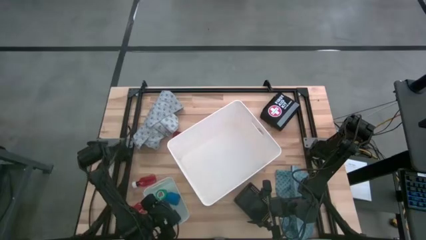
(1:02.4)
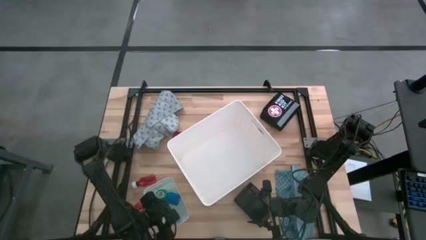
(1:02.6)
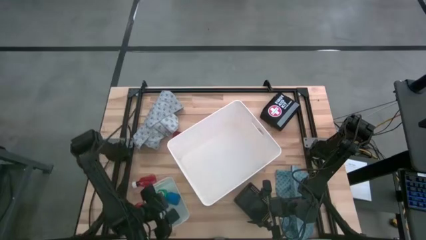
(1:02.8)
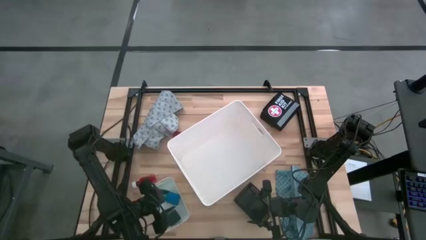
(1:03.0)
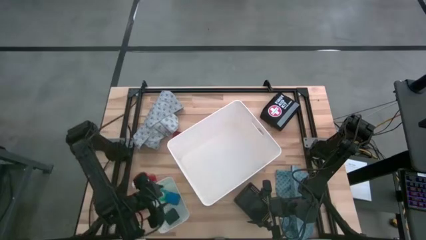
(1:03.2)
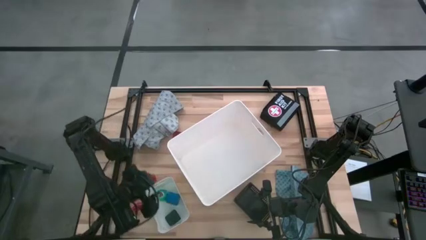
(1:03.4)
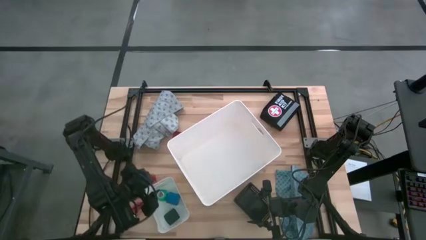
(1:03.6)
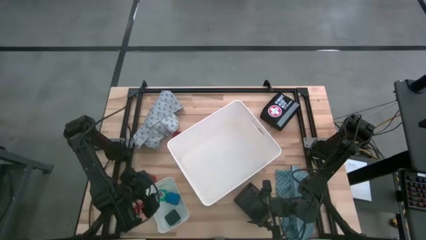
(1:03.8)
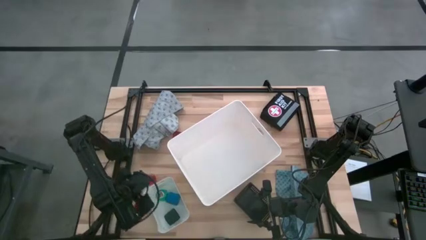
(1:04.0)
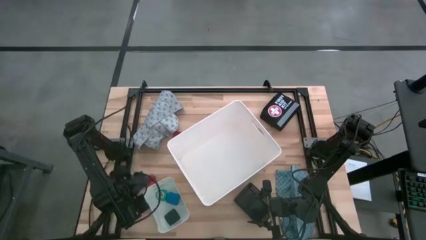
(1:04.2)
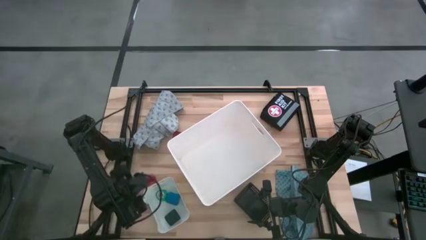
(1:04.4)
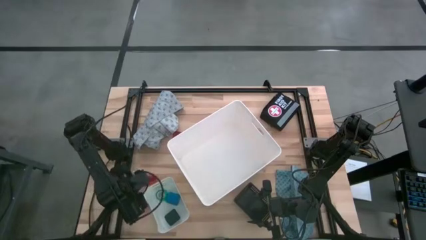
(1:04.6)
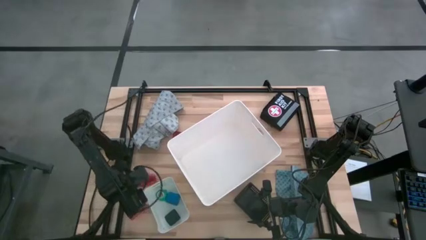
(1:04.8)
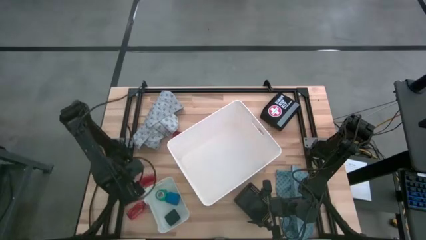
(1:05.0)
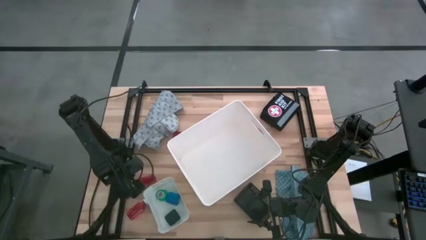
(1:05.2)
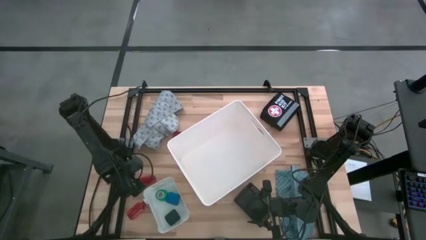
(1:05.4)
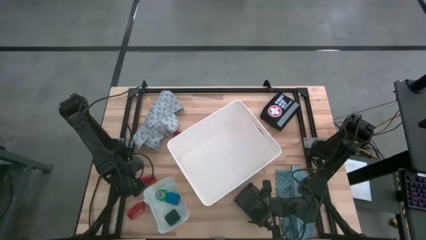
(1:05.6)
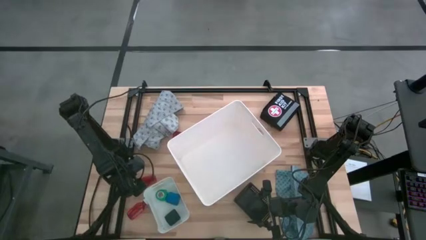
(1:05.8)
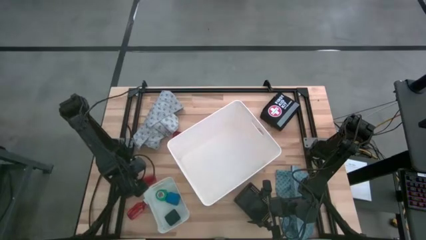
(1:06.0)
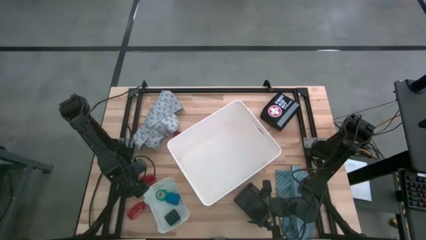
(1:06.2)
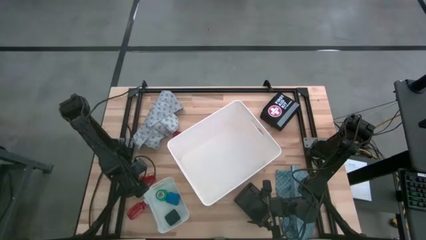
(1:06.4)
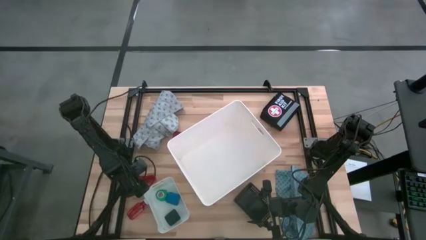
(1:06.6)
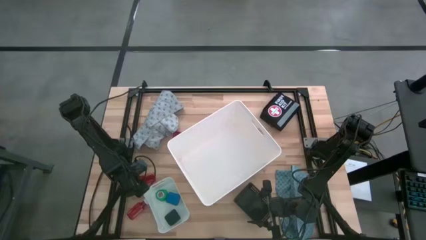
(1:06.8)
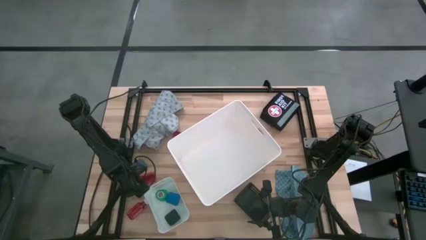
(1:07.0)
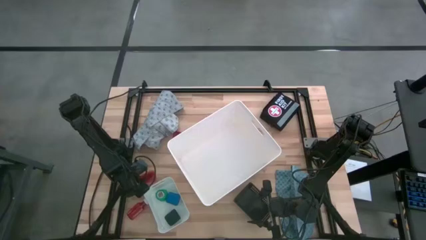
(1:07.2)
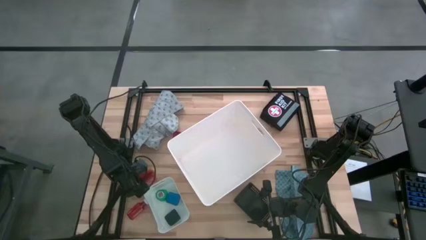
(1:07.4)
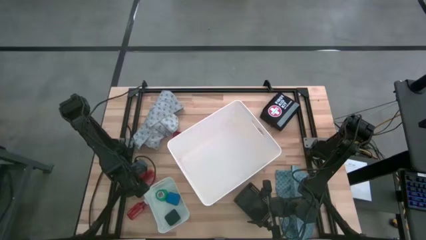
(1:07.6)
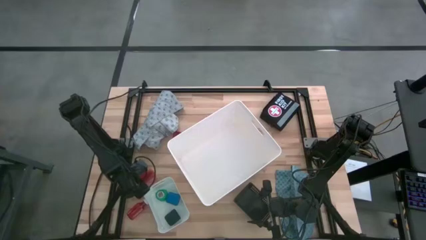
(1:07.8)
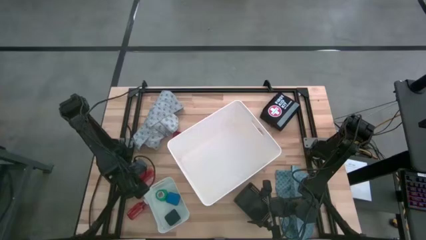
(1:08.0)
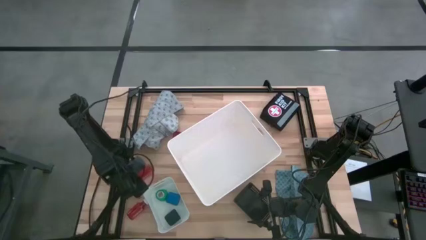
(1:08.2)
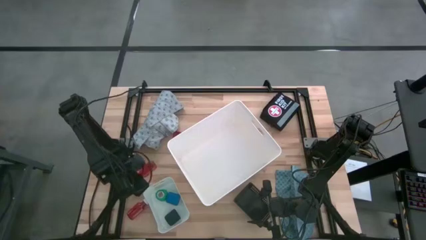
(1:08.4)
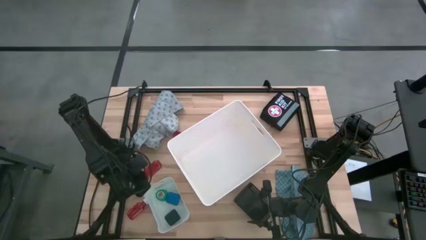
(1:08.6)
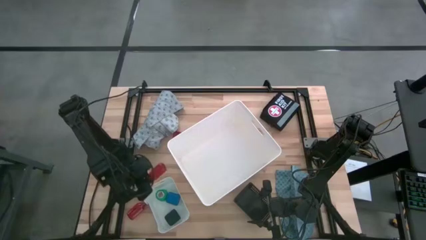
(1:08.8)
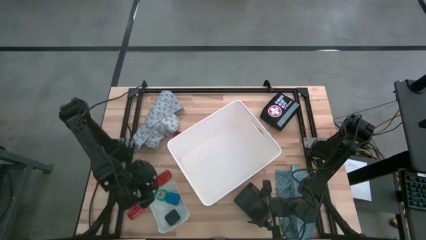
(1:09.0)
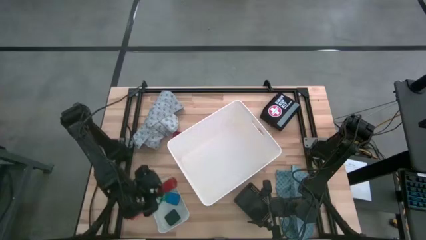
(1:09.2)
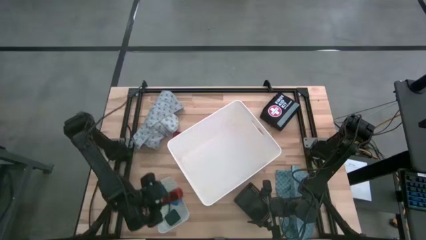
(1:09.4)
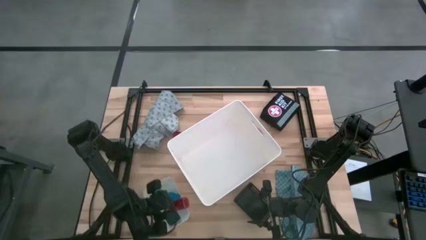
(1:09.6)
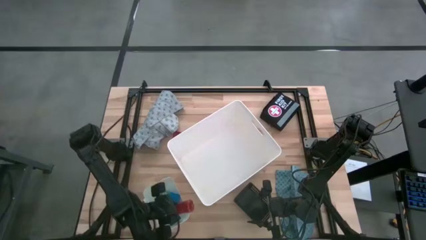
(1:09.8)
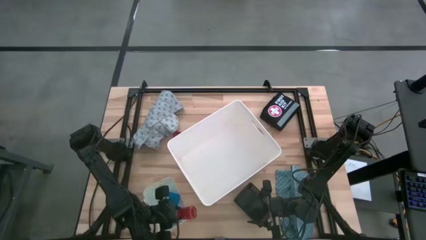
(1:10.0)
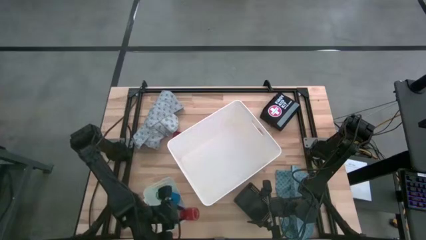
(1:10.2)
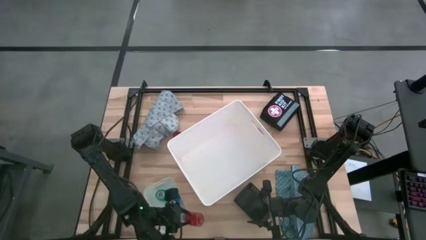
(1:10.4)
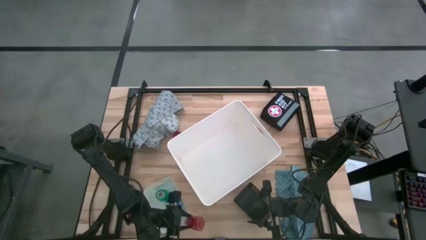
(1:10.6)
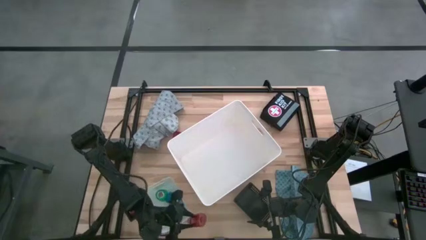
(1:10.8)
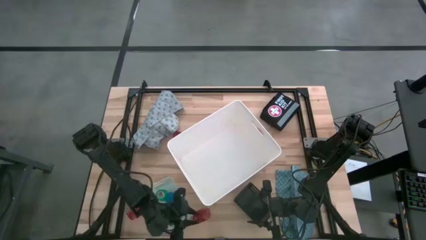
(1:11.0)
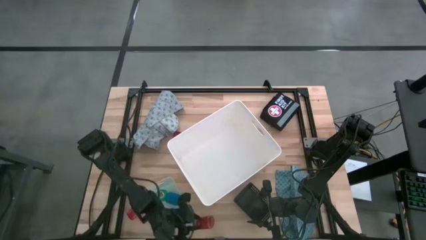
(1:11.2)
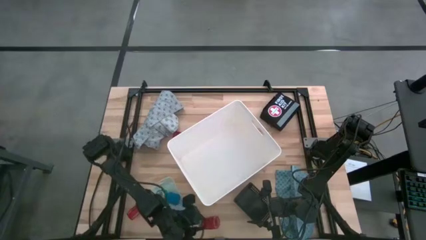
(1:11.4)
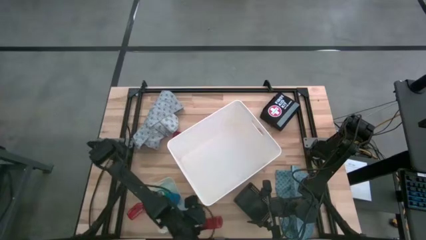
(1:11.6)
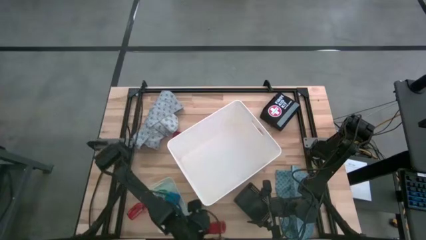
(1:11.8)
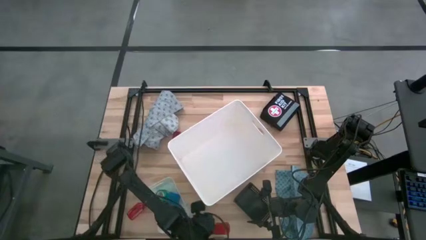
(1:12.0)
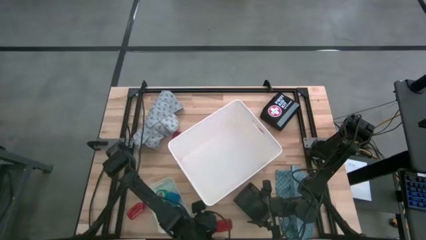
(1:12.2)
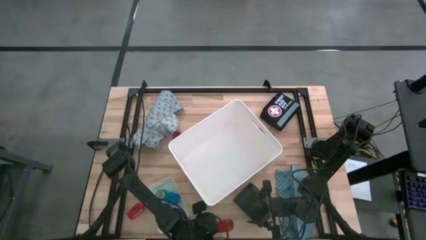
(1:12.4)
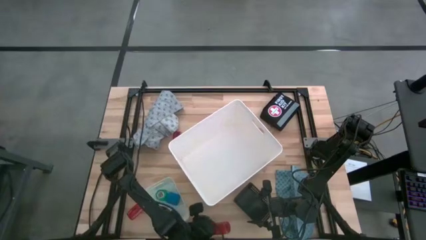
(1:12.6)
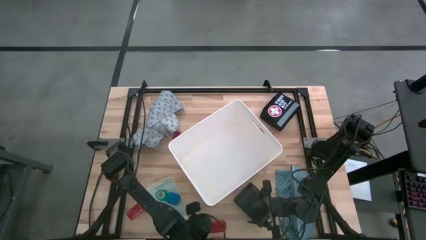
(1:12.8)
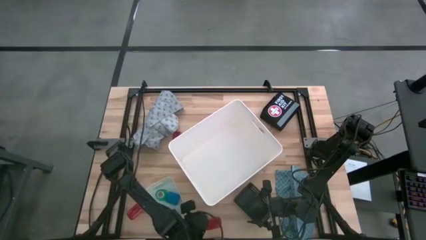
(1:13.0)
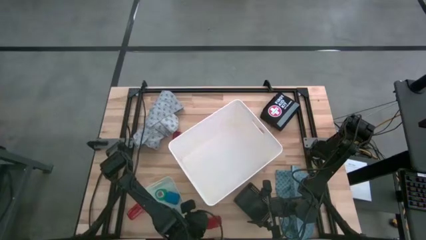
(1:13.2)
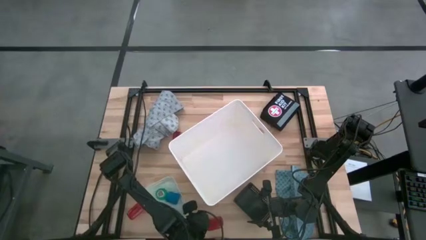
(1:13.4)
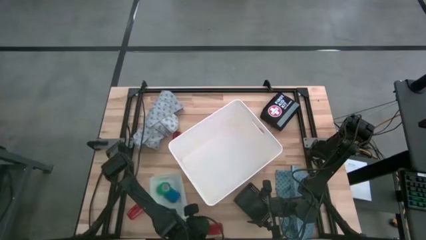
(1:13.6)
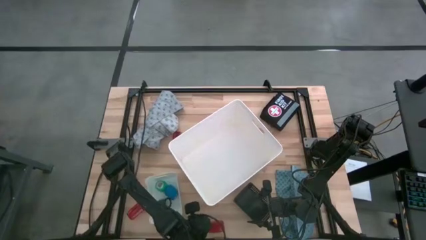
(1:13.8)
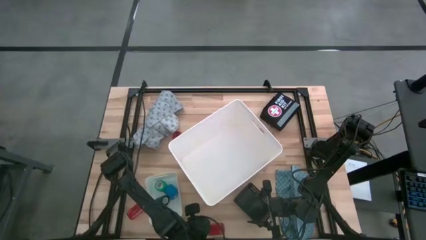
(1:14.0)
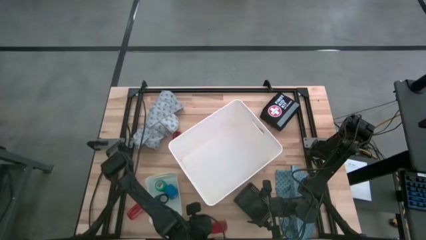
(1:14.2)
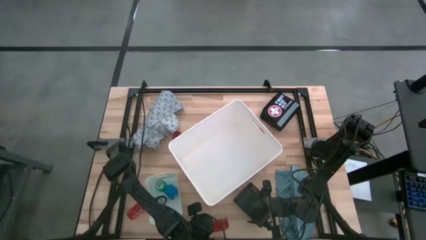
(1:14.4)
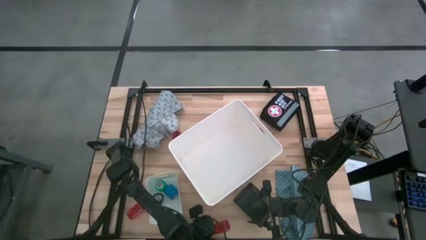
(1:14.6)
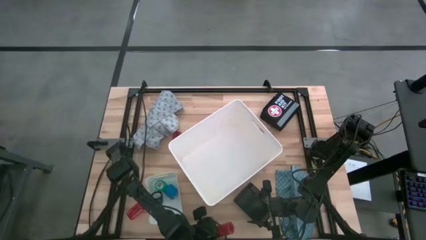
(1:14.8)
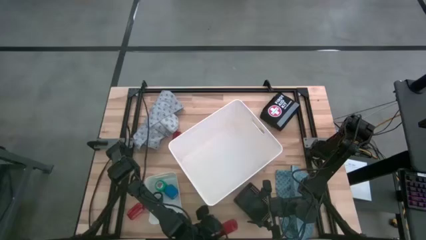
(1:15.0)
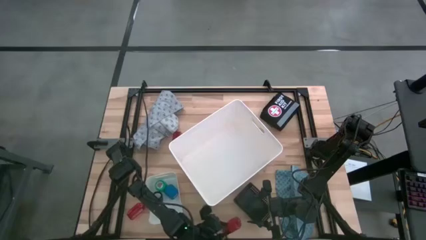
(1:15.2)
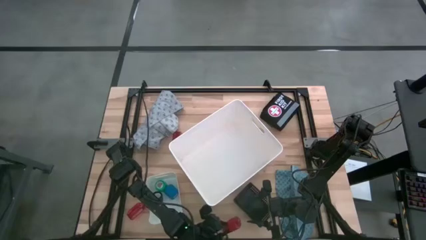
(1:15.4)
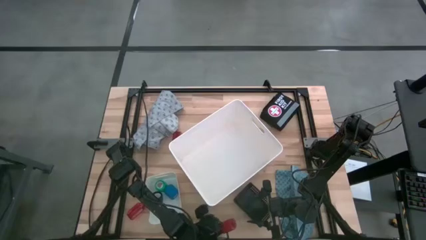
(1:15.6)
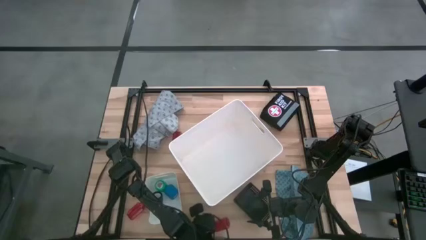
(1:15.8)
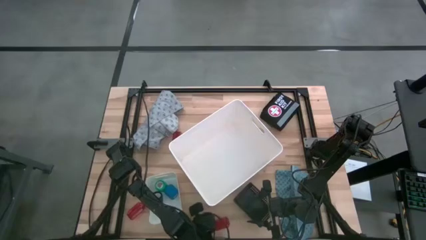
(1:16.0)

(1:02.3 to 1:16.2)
Task: Pick & place medical supplies in basket/bin
Put the middle orange bottle into the black basket

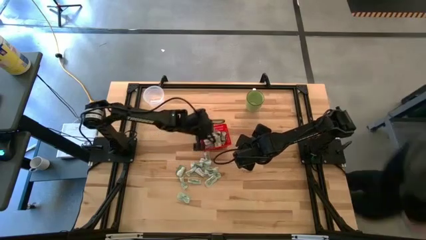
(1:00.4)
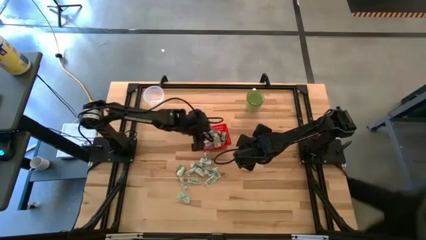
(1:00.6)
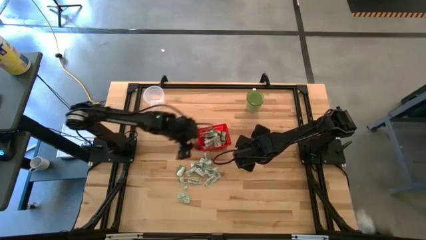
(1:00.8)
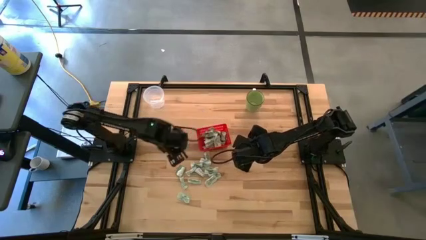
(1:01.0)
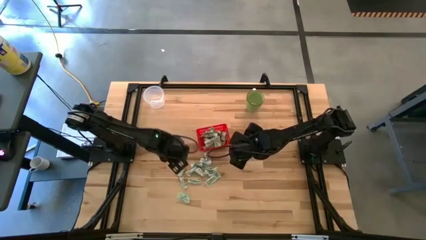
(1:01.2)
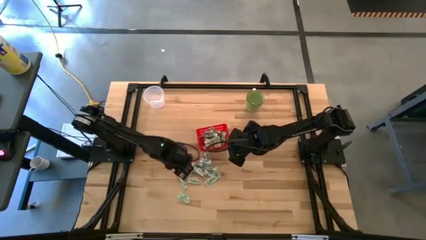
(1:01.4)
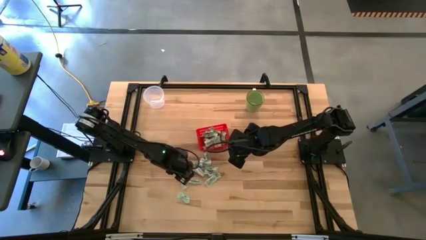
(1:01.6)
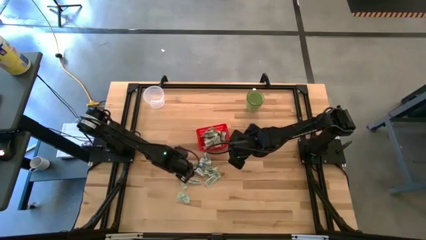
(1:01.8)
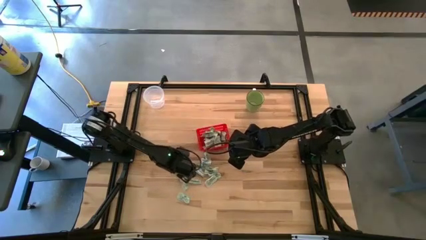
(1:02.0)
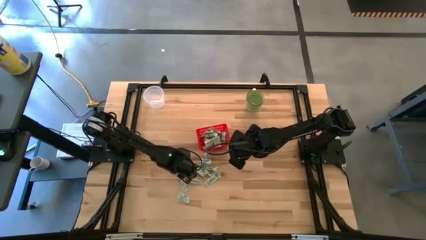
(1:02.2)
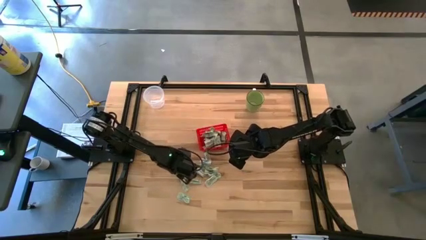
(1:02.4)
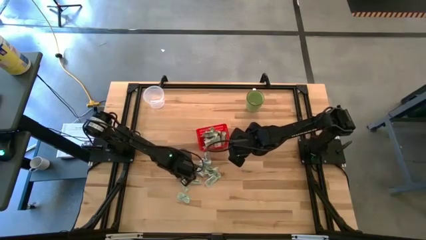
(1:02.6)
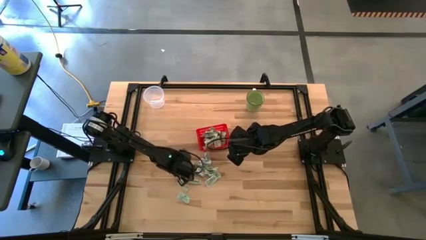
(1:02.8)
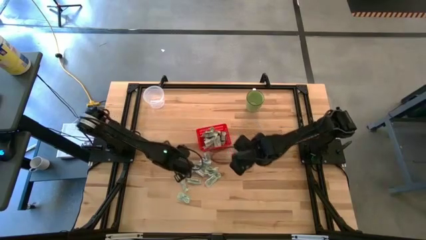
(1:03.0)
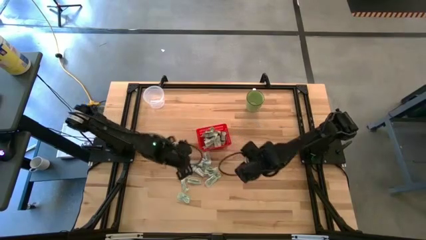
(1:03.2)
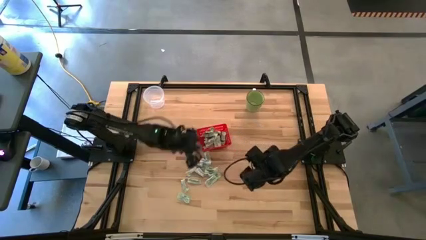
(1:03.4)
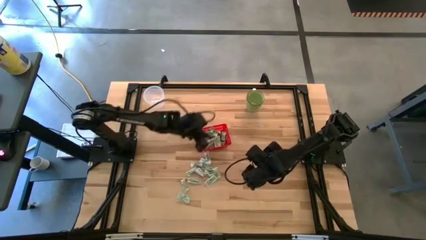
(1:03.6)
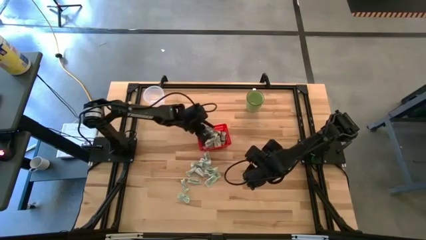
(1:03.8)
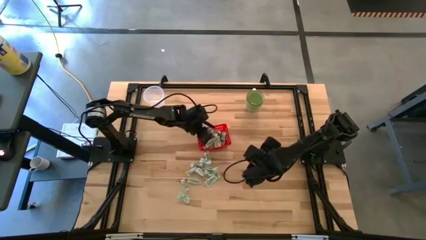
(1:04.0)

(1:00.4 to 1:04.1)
Task: Pick and place Stevia / Truvia into bins
Put the truvia packet into the red basket

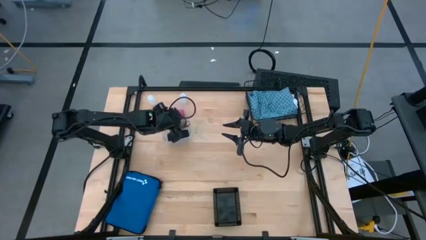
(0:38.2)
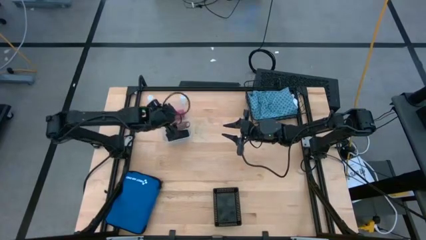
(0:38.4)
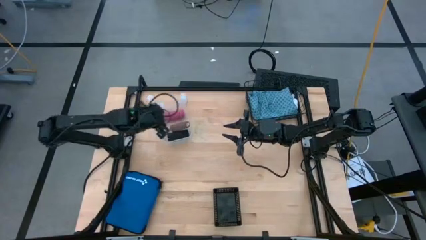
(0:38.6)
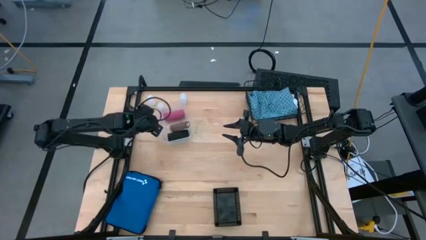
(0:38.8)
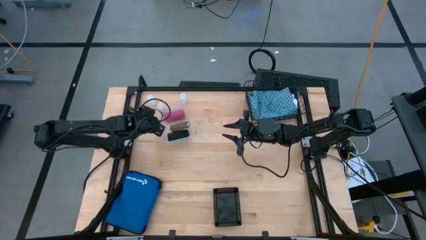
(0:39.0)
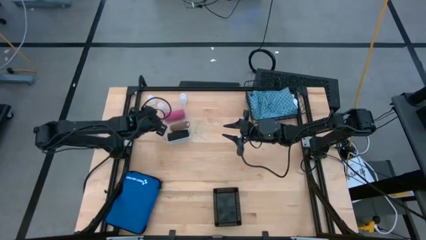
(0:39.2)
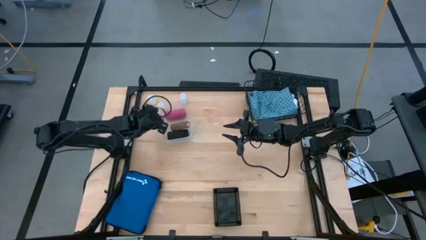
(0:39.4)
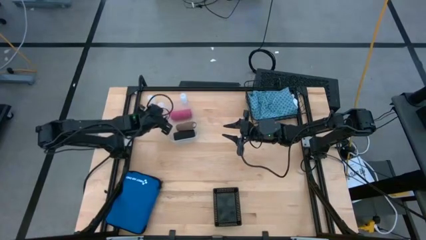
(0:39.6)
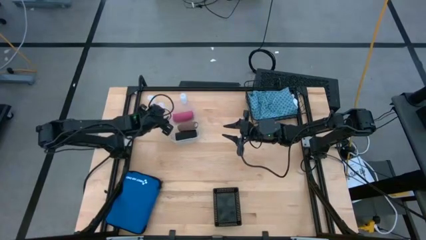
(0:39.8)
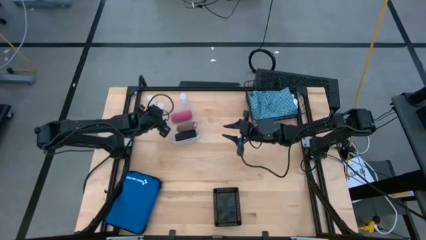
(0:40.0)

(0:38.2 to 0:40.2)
Task: Pick & Place Medicine items
Adjust the transparent bin
